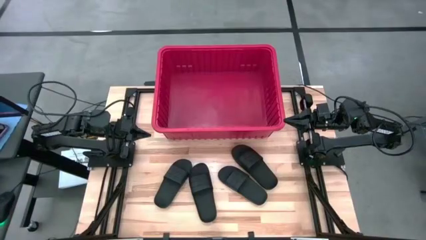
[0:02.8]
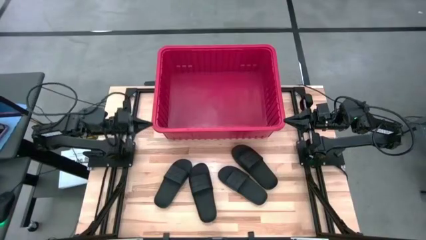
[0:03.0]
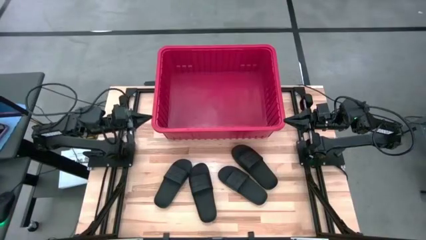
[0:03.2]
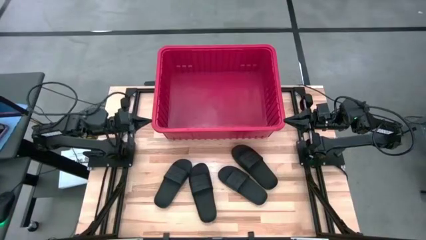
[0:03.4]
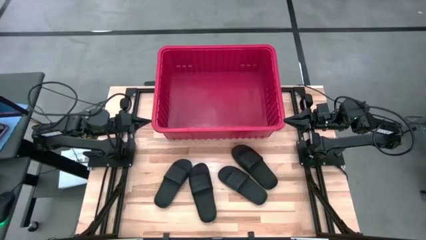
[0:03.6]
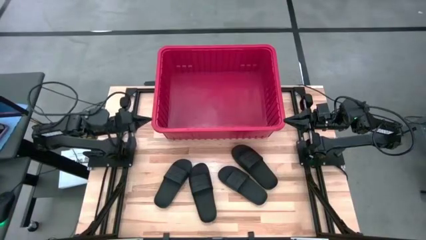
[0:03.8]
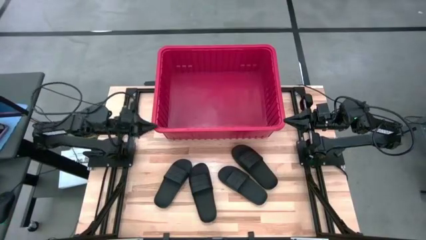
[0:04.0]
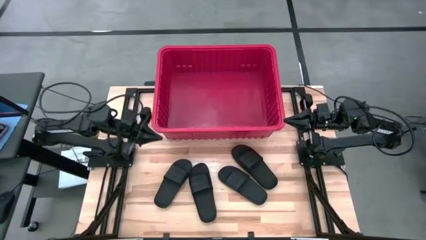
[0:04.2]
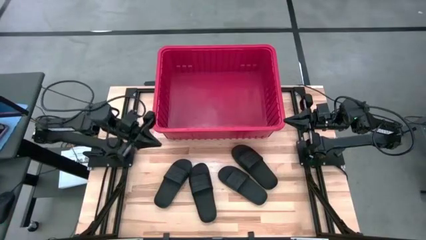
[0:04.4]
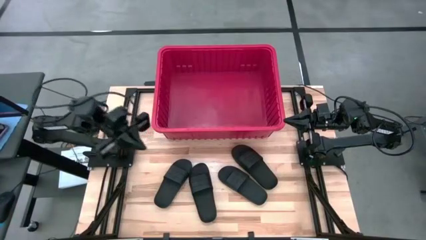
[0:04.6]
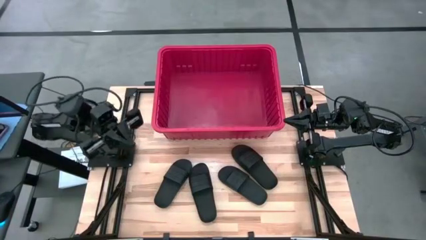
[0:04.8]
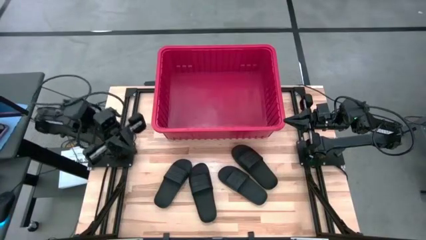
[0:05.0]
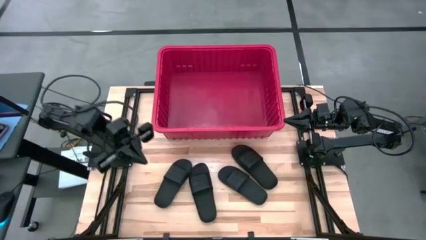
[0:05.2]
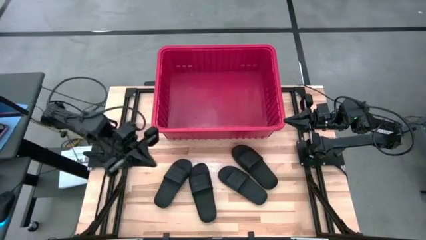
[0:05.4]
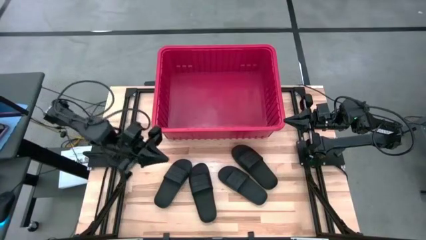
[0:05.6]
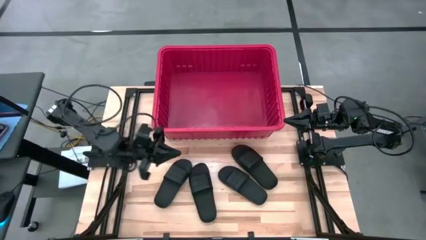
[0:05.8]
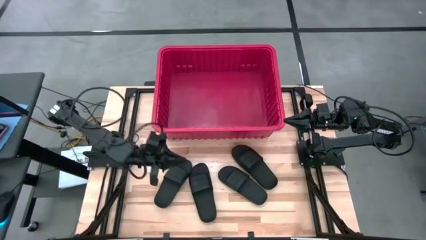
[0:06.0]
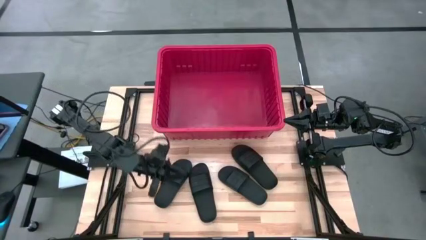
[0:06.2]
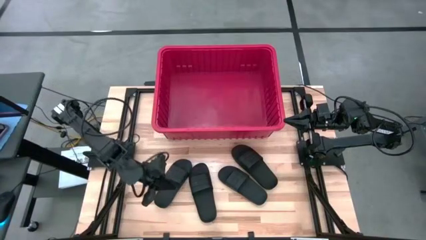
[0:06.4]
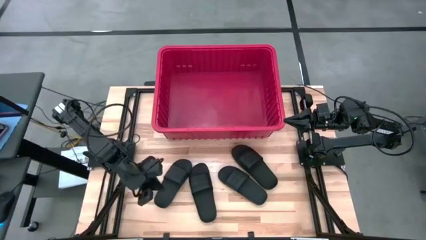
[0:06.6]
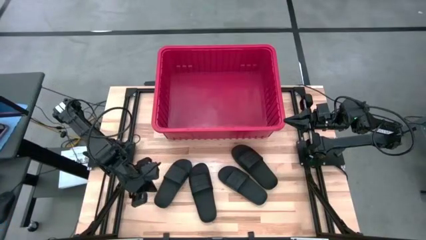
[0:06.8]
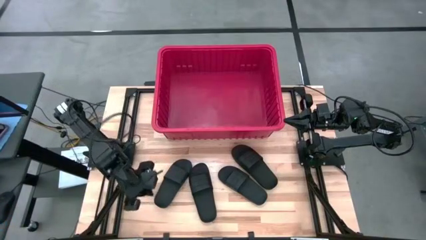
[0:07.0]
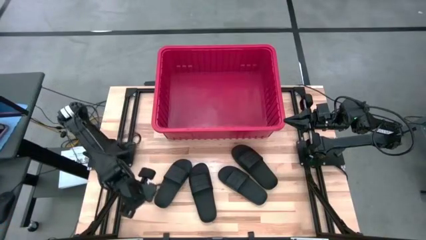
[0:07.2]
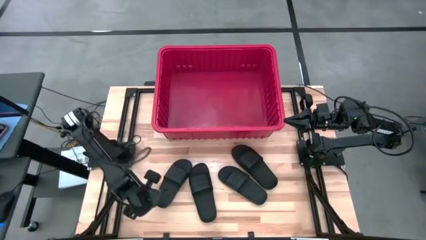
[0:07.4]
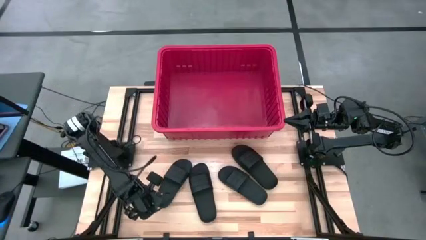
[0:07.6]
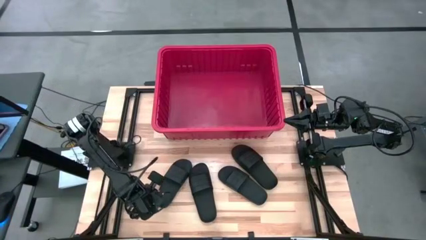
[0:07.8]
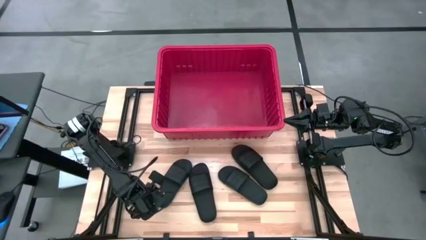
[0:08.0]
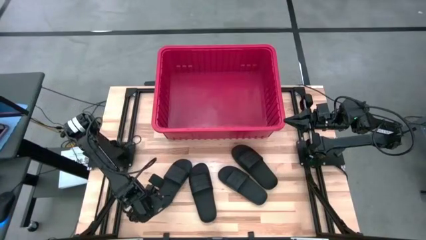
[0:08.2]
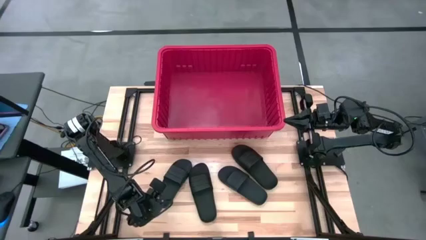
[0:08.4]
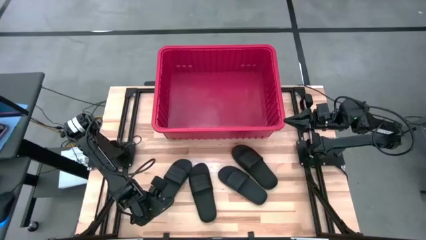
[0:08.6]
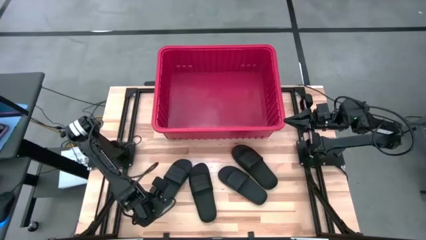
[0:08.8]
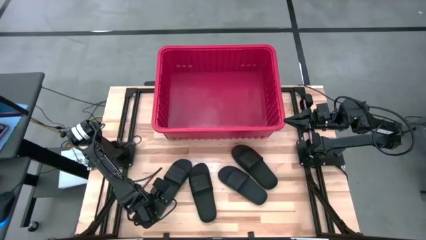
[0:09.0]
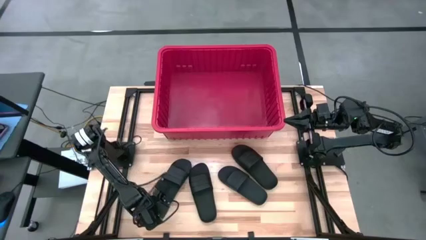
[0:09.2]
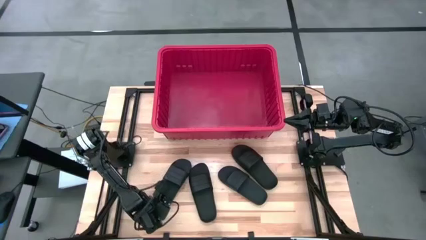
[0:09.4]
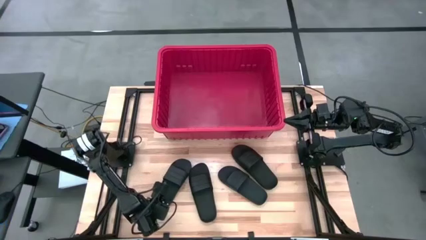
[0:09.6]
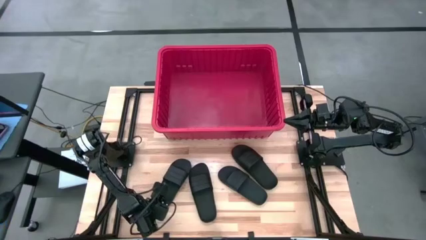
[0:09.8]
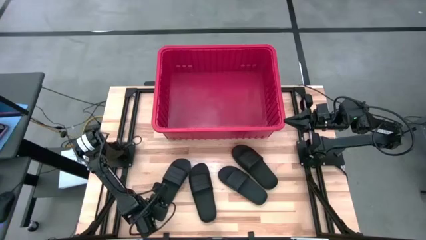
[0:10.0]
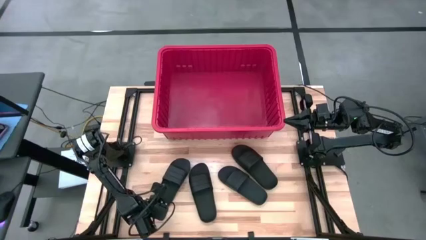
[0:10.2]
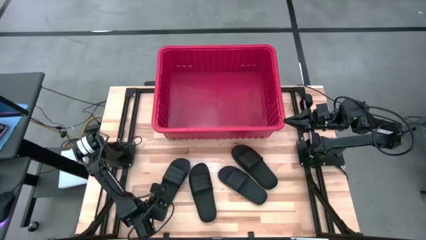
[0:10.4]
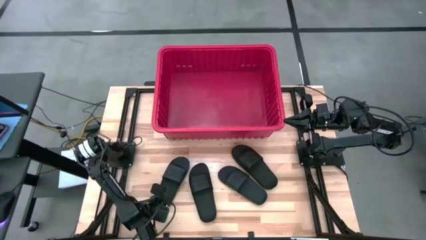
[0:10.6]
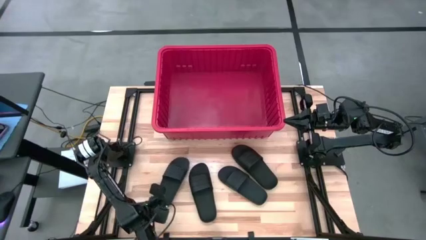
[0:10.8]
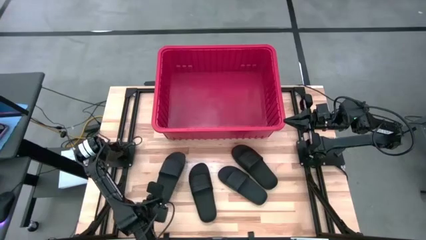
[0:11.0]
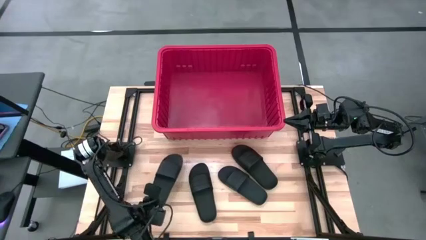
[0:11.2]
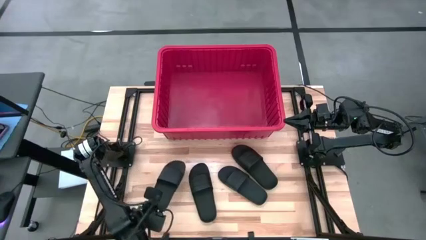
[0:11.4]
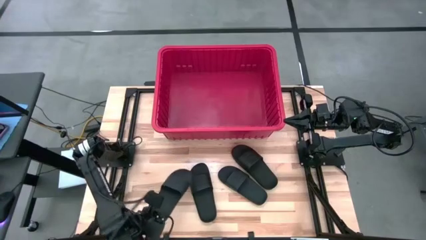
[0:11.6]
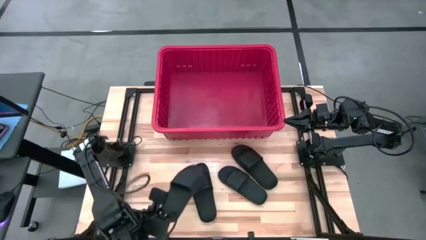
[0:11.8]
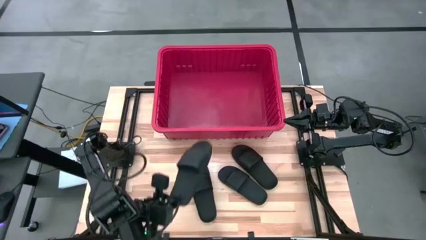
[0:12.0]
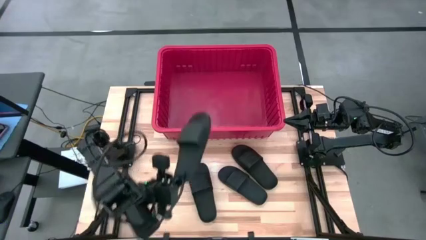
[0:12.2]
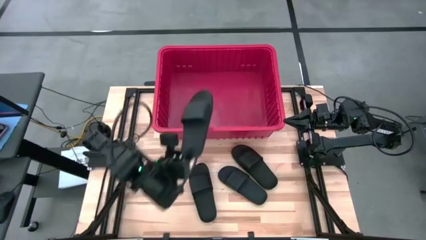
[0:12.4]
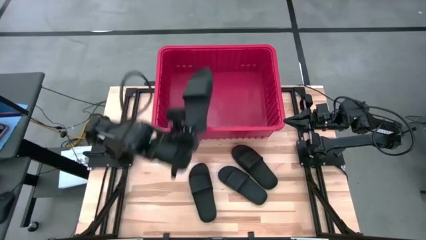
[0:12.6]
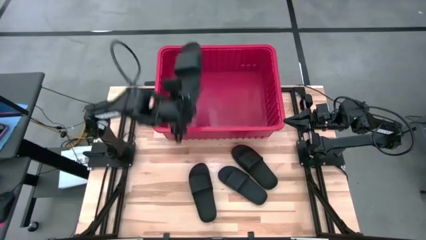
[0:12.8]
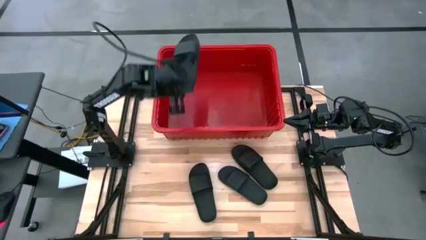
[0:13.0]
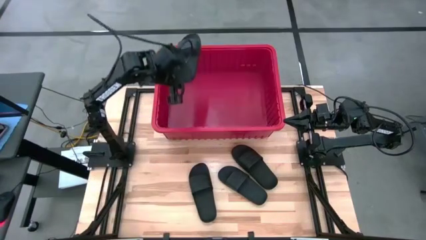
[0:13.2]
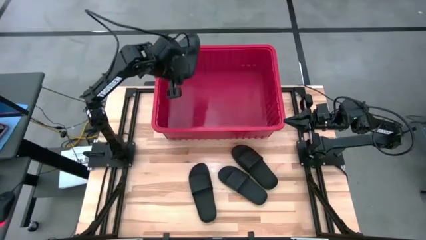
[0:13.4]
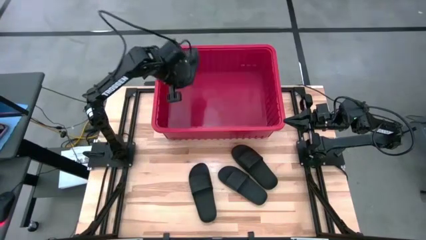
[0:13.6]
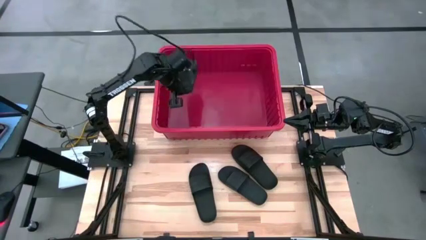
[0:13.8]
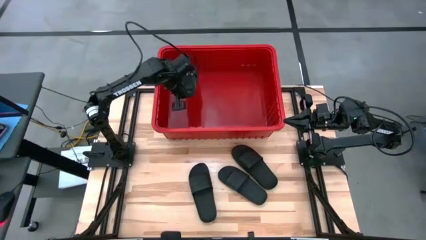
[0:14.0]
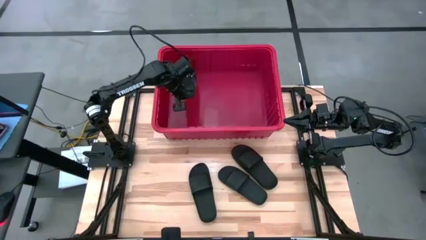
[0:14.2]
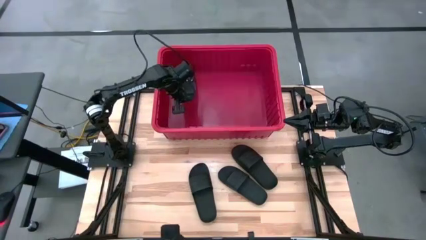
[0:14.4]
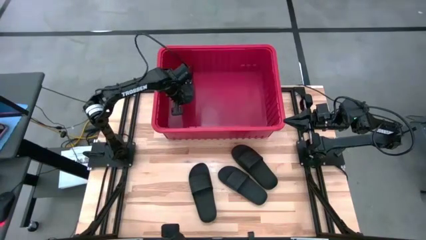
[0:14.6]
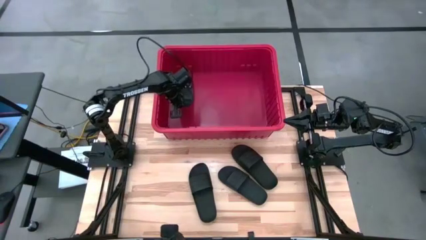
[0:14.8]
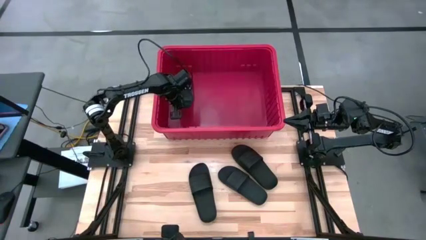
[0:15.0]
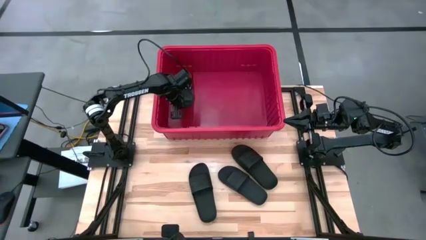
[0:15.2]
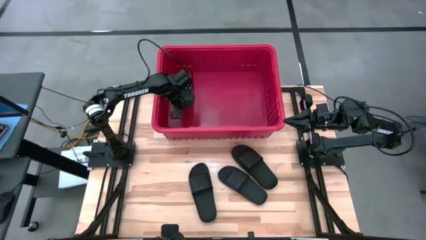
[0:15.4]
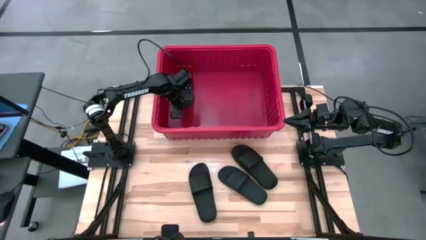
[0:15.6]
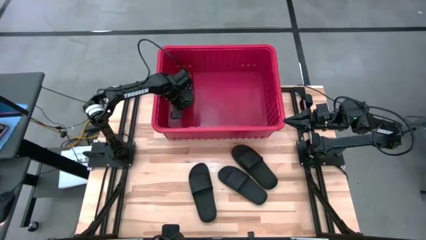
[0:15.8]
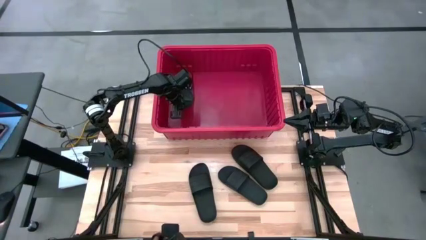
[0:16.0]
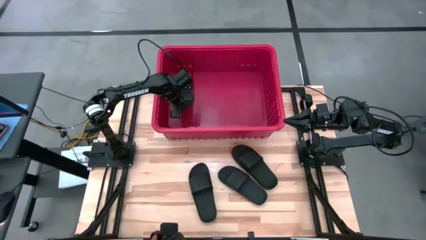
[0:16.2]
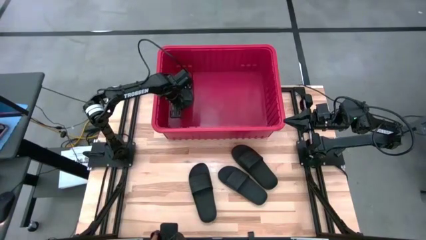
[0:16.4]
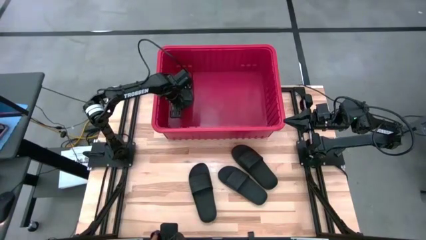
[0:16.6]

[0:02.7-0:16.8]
Task: Pick and place slides into bin
Put the black slide into the red bin
